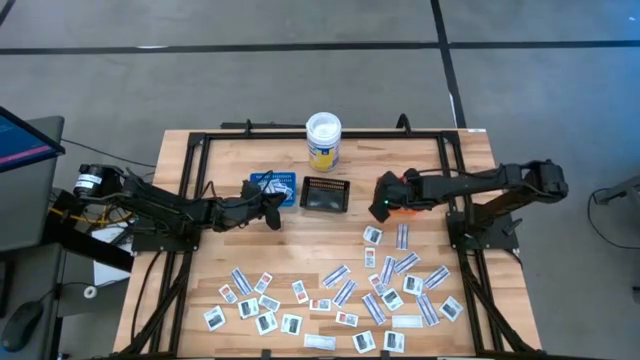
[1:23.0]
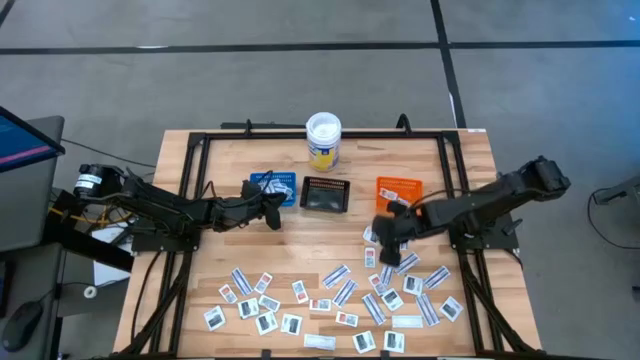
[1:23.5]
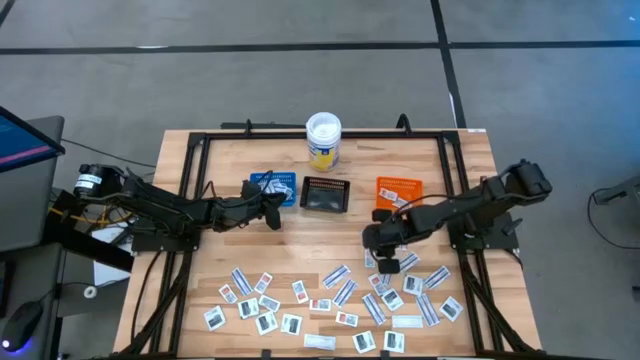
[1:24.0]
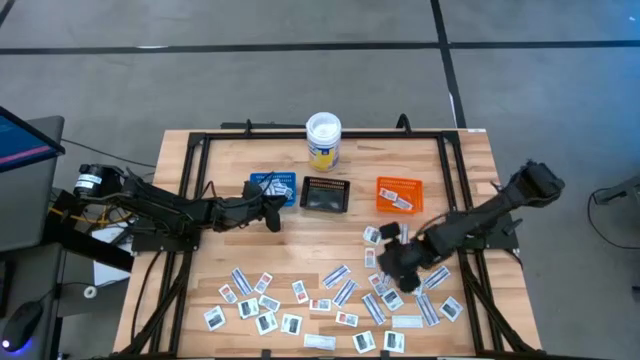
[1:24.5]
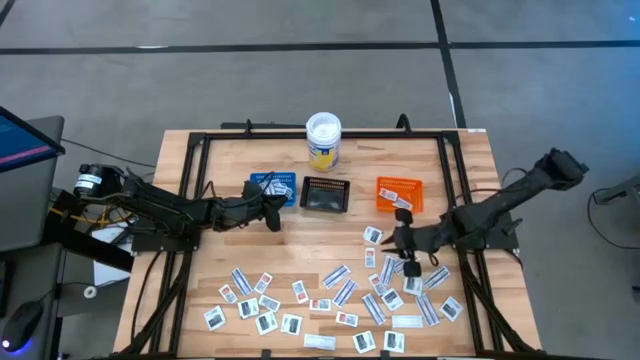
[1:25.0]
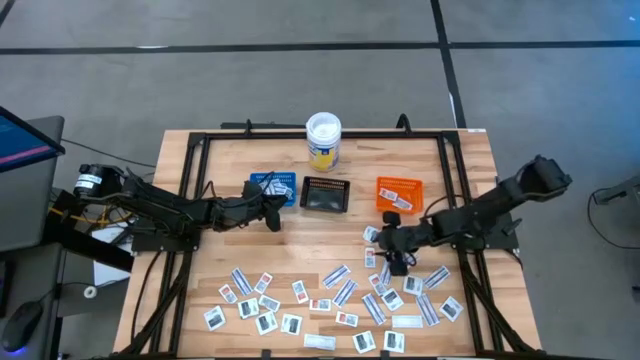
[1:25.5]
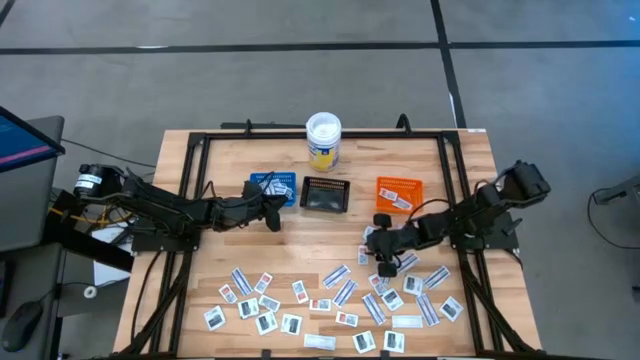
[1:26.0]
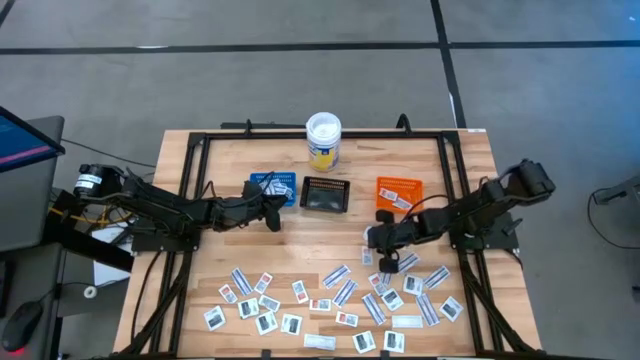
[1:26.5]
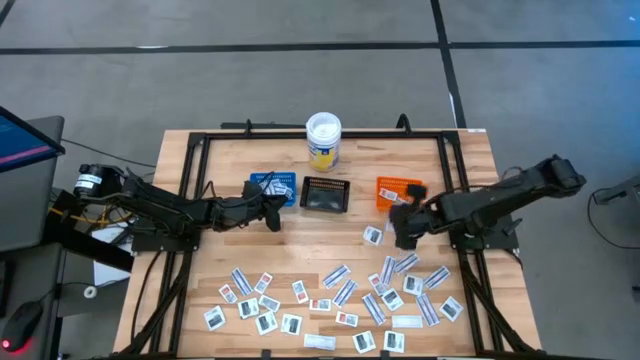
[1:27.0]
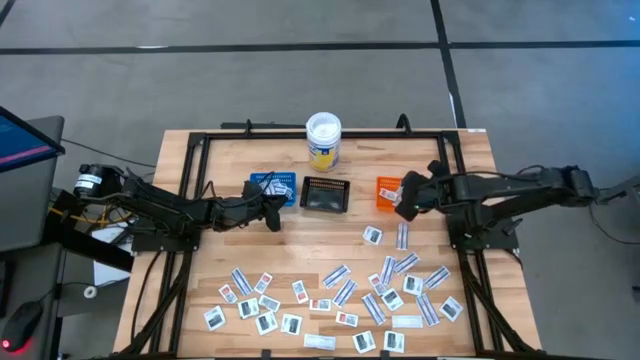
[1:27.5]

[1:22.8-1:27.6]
Task: Pick & Place First Aid Supplies
Put the orange ointment pack into the orange bin

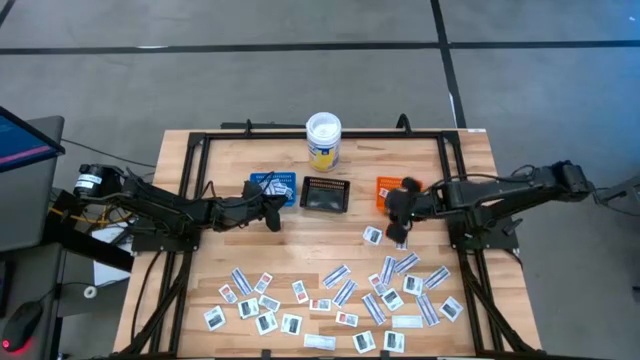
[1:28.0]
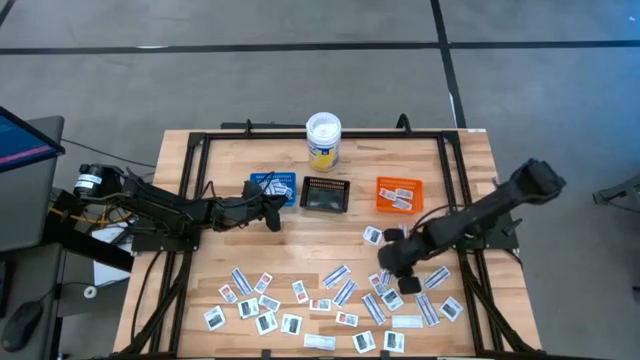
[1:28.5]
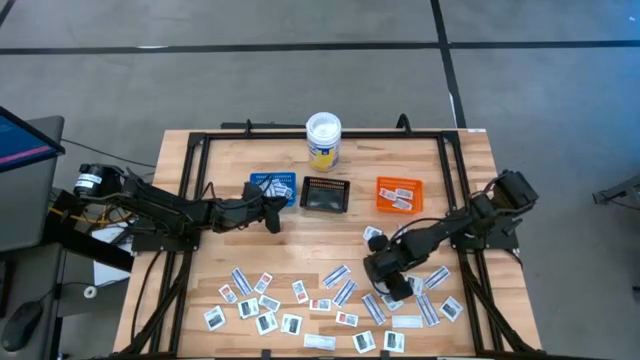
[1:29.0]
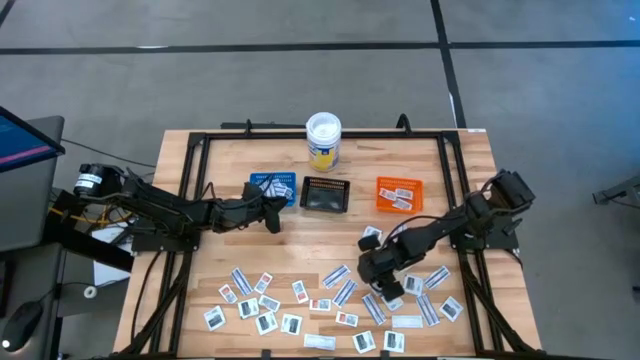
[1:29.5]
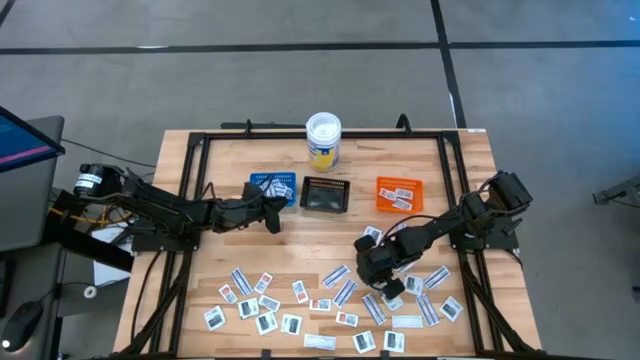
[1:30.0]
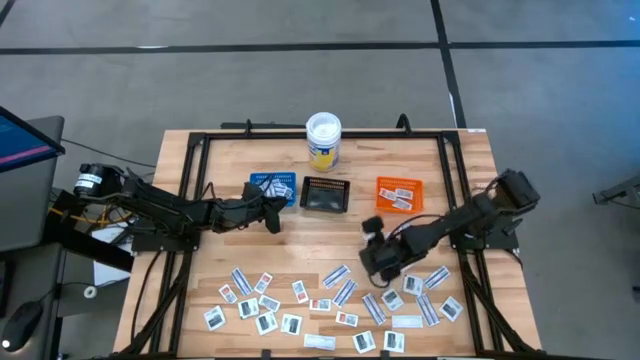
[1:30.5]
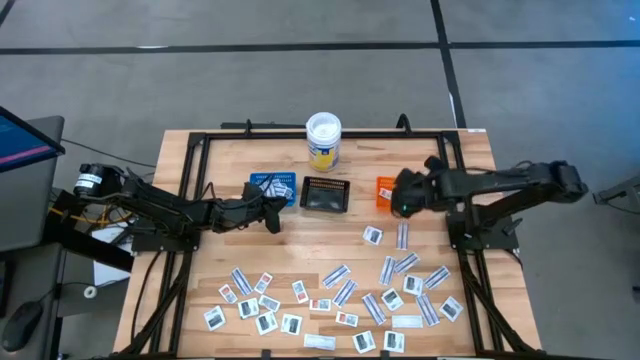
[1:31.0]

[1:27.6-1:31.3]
Put the orange ointment pack into the orange bin

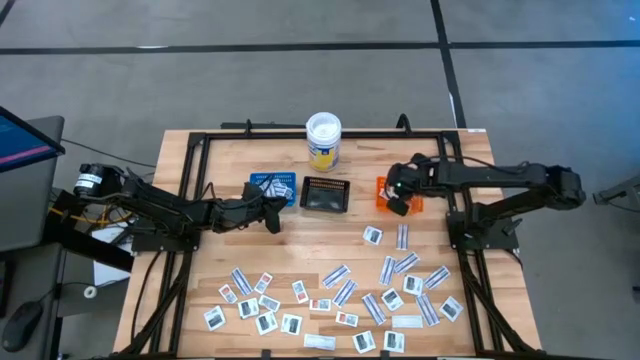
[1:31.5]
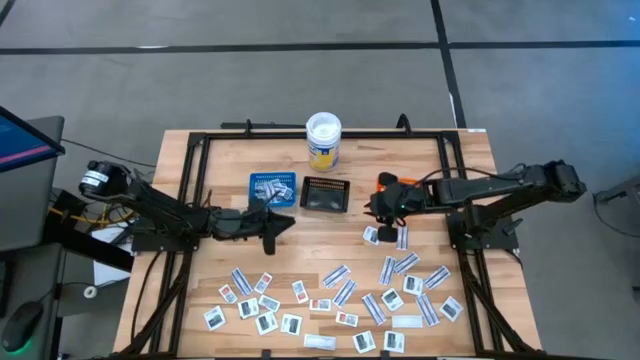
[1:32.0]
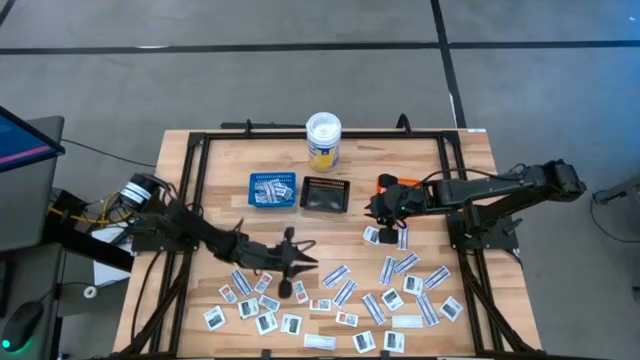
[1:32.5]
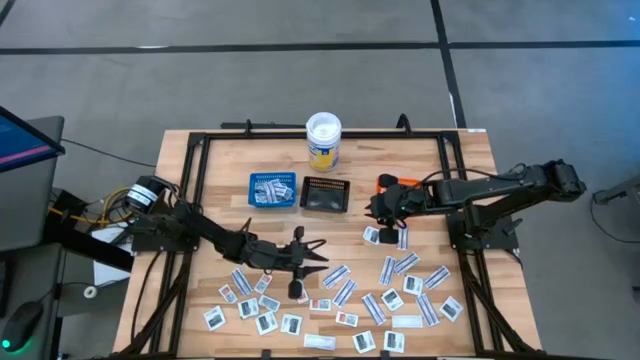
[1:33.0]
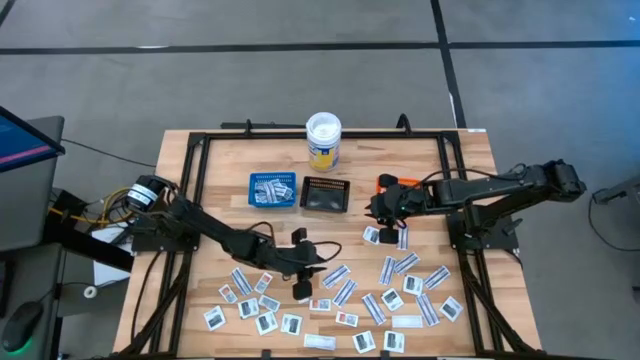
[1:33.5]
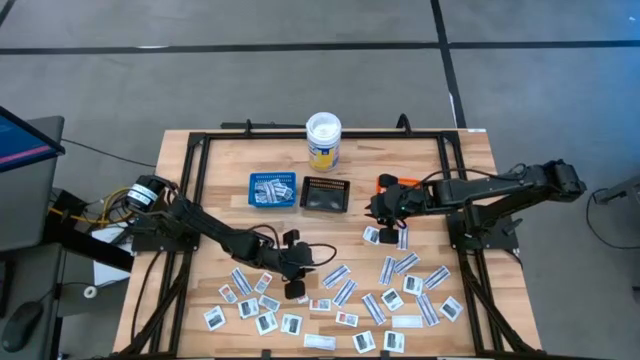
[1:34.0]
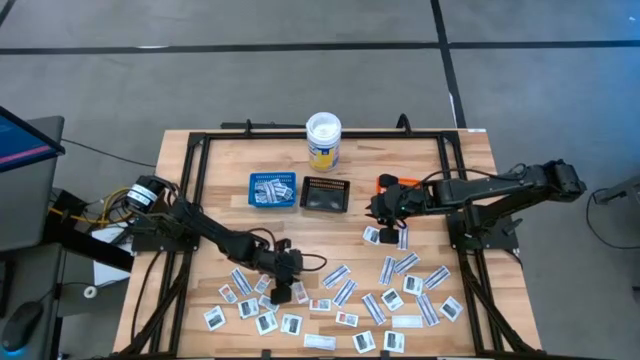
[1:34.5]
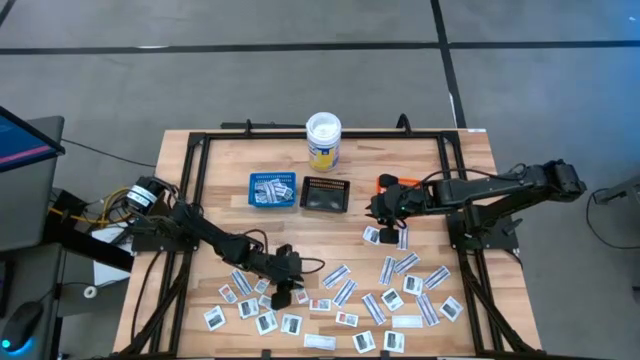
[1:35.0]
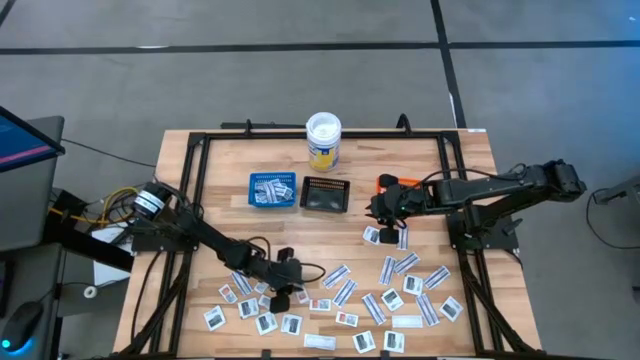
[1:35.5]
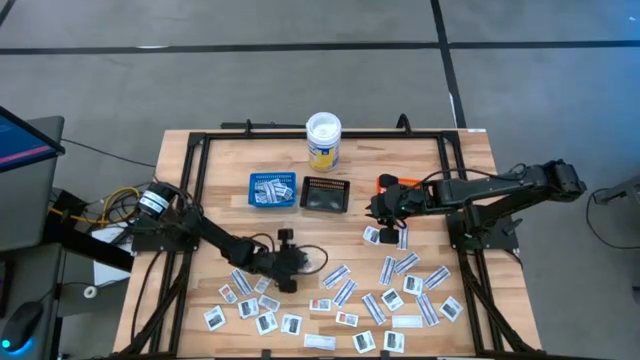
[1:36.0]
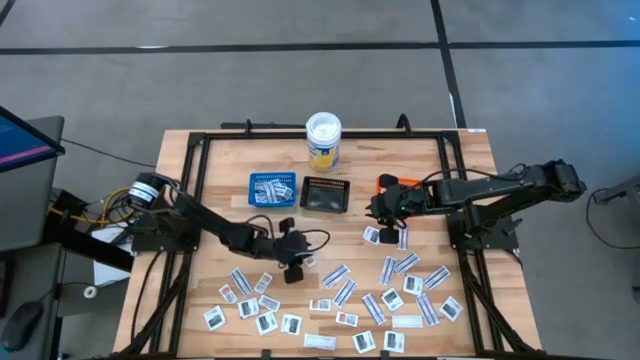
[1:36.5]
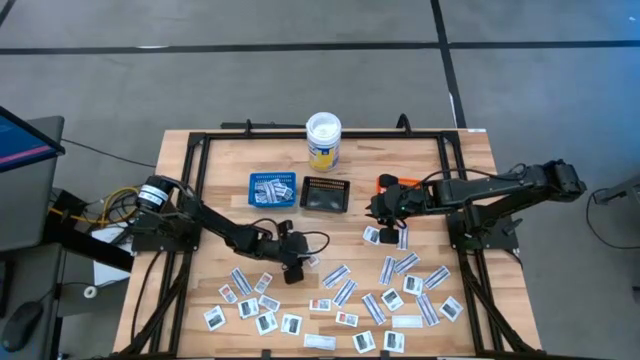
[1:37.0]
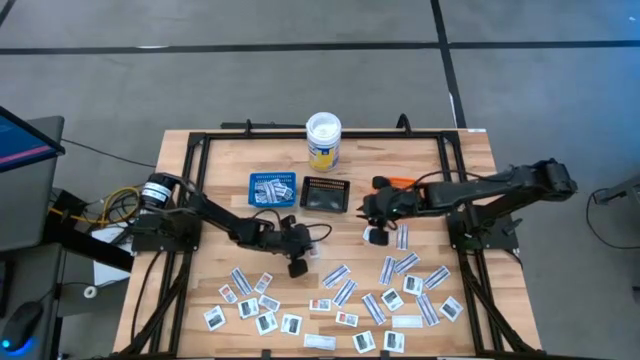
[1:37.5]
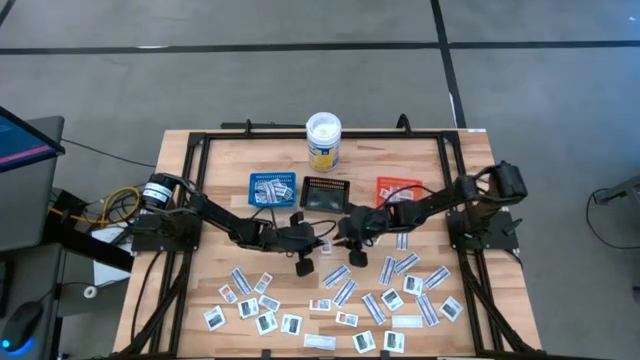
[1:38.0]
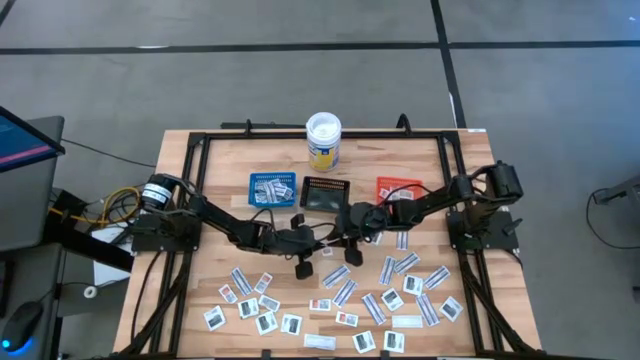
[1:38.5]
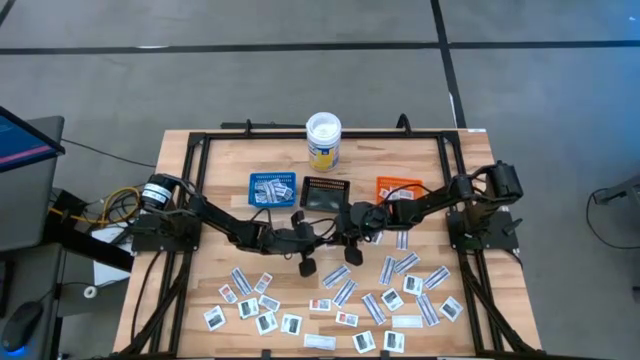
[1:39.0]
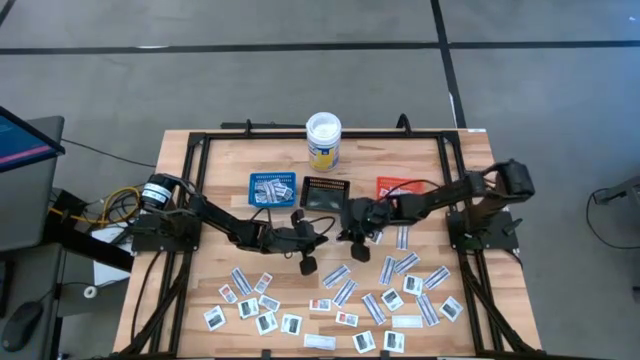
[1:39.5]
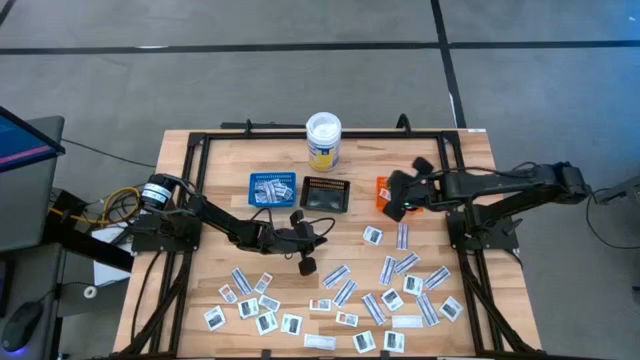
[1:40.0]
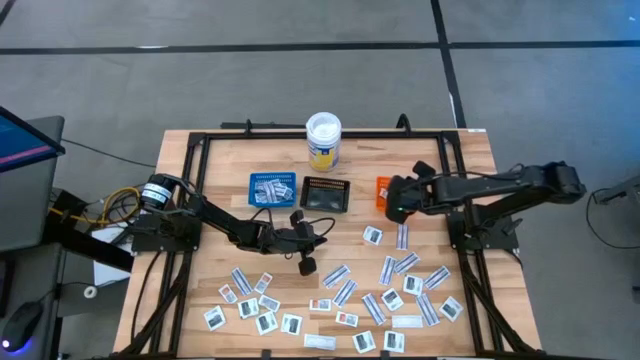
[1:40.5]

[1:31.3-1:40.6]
Put the orange ointment pack into the orange bin

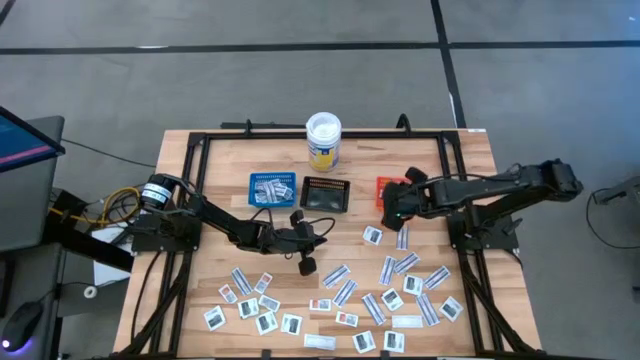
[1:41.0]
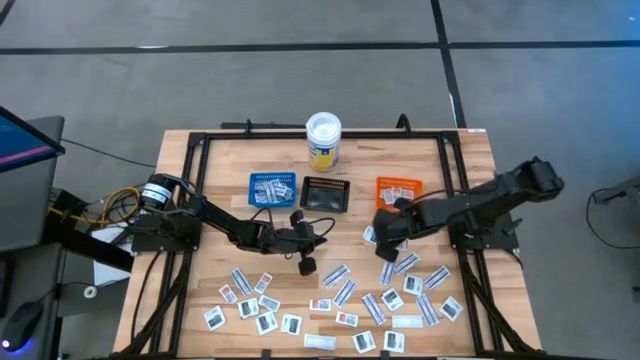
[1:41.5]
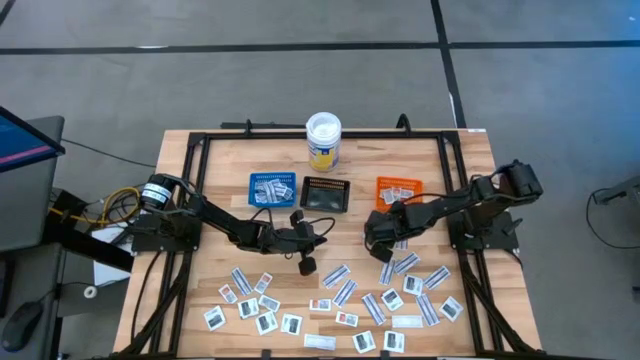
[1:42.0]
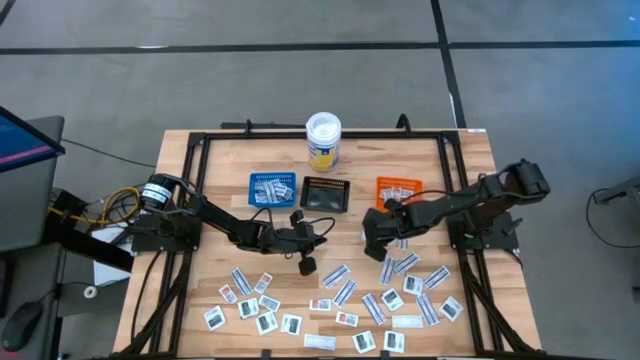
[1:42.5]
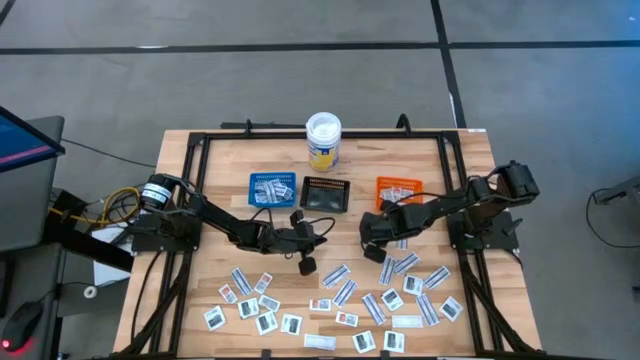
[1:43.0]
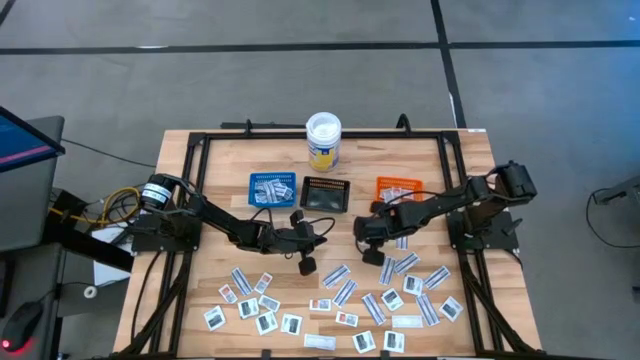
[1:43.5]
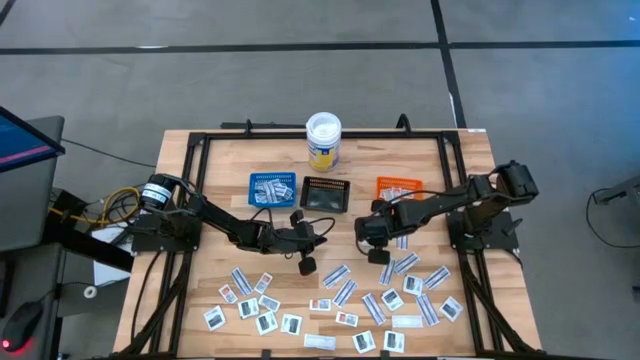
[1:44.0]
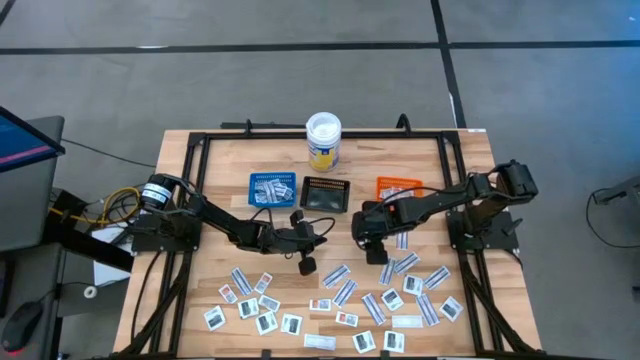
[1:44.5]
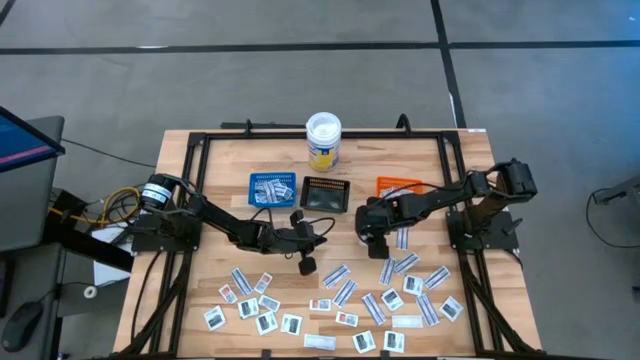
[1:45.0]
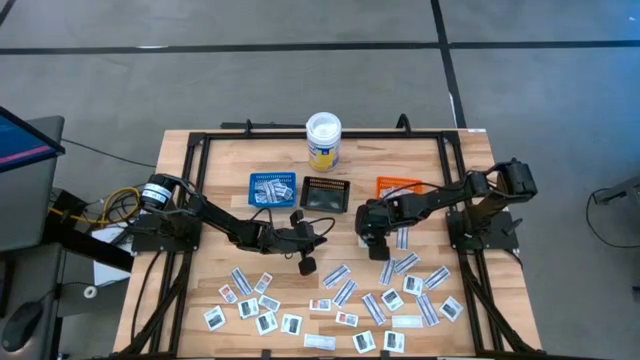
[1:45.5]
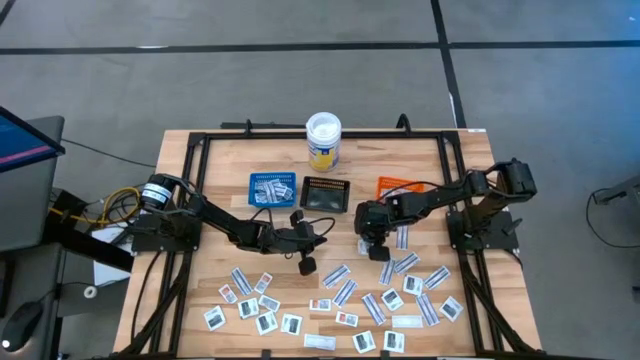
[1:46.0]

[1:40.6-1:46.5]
Put the black towelette pack into the black bin
